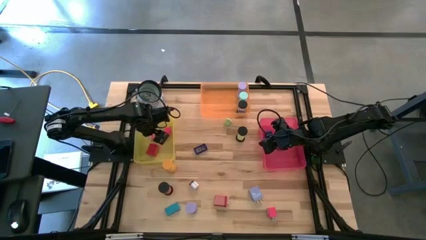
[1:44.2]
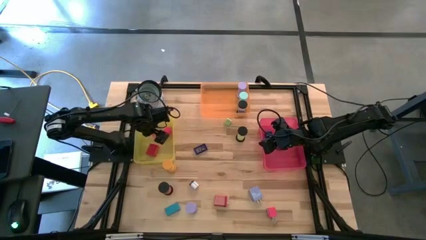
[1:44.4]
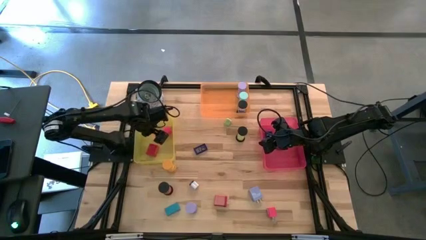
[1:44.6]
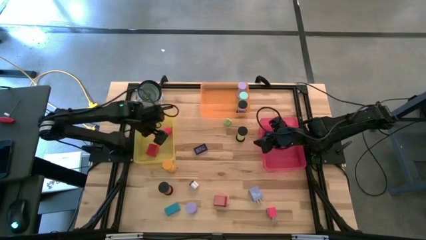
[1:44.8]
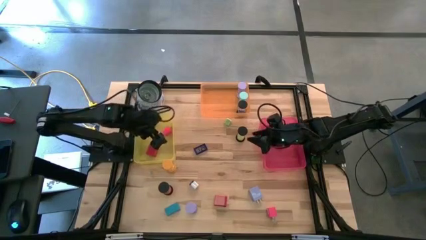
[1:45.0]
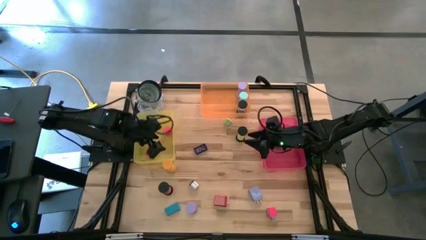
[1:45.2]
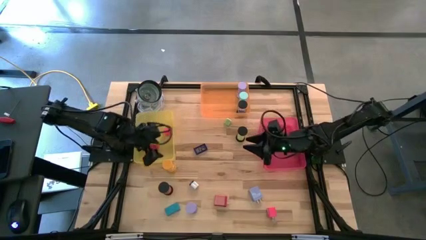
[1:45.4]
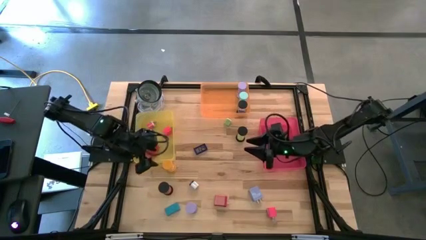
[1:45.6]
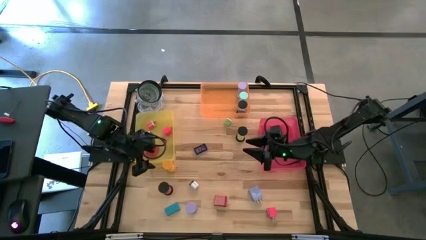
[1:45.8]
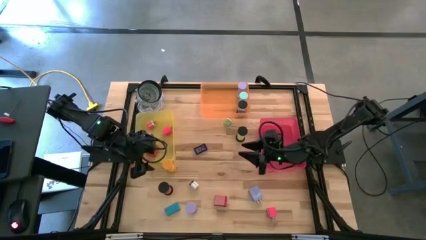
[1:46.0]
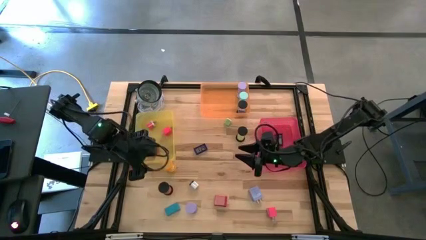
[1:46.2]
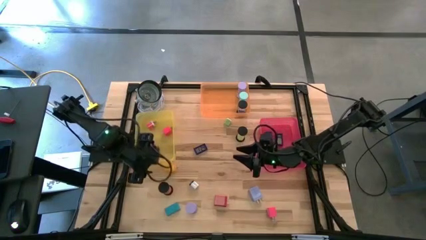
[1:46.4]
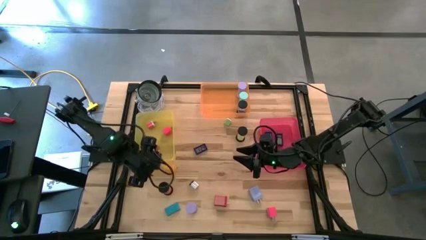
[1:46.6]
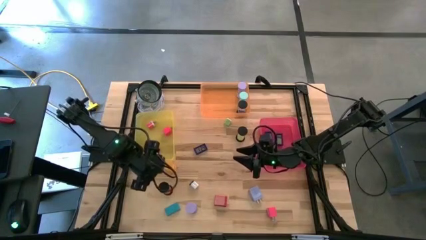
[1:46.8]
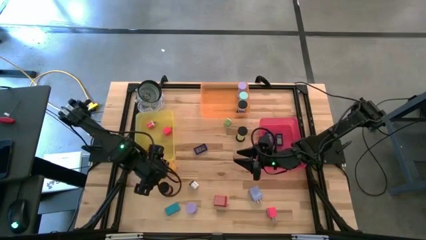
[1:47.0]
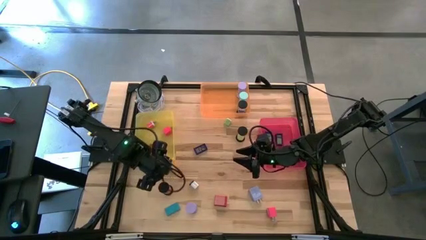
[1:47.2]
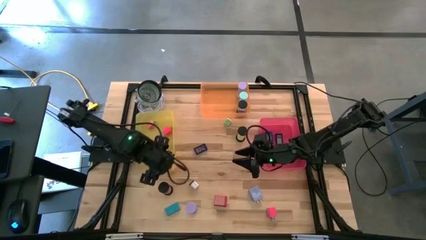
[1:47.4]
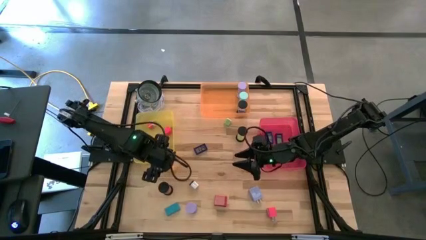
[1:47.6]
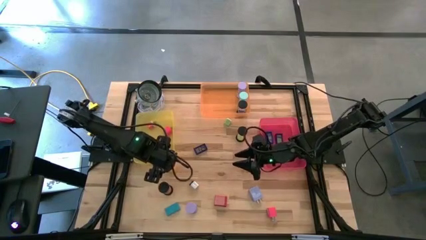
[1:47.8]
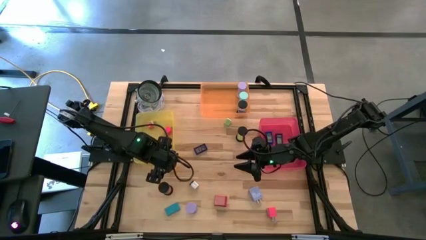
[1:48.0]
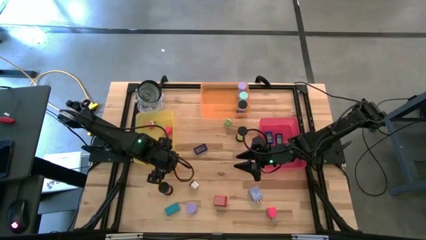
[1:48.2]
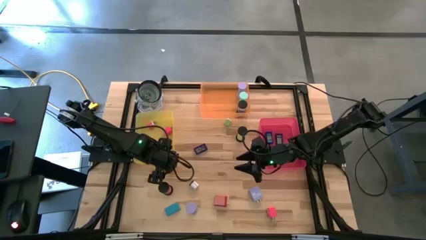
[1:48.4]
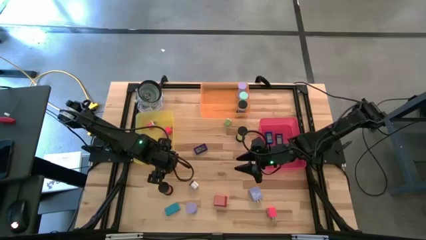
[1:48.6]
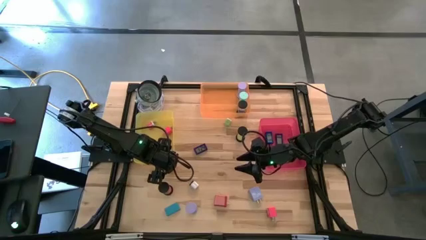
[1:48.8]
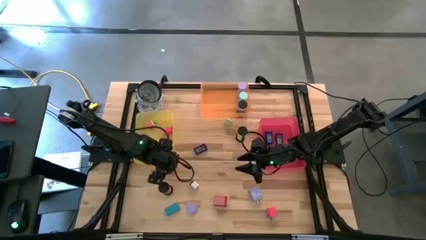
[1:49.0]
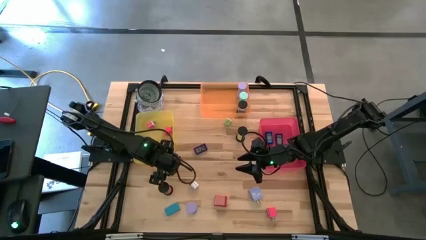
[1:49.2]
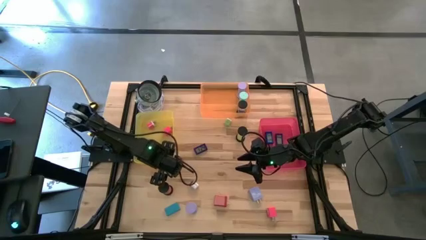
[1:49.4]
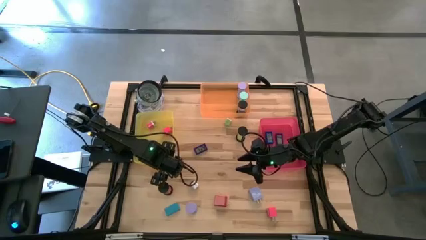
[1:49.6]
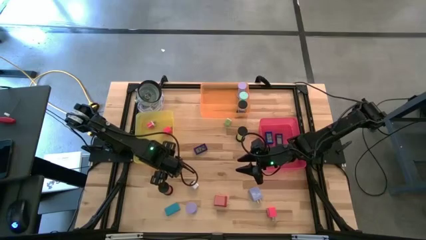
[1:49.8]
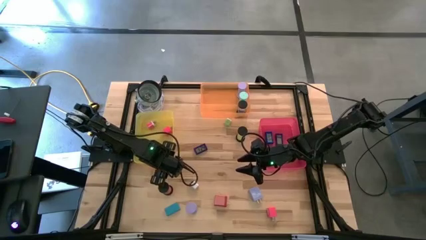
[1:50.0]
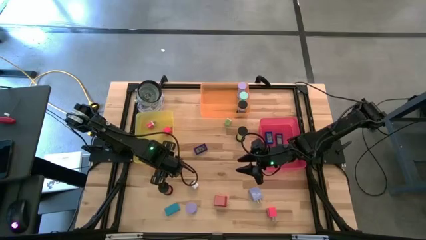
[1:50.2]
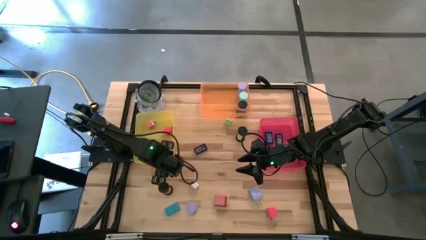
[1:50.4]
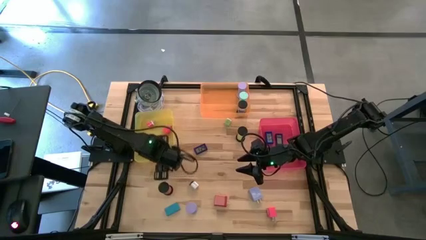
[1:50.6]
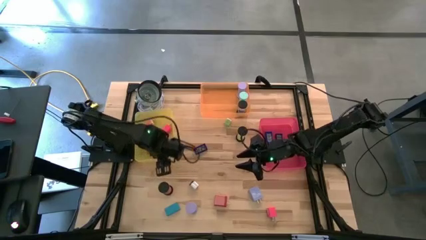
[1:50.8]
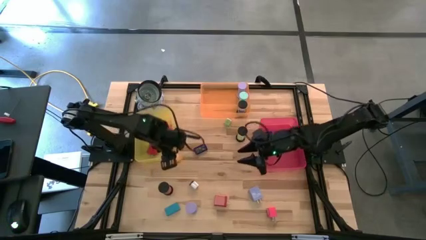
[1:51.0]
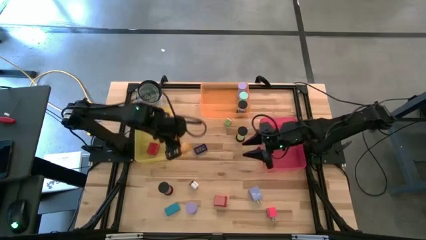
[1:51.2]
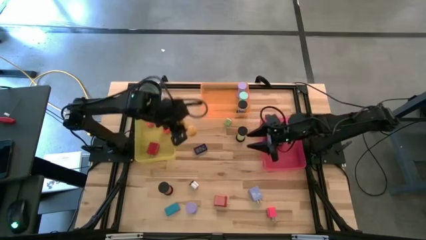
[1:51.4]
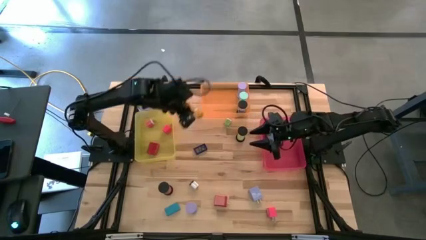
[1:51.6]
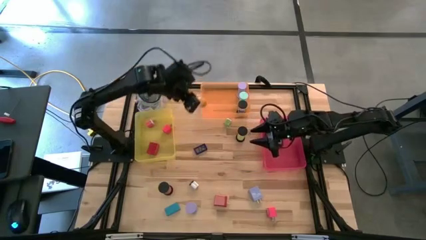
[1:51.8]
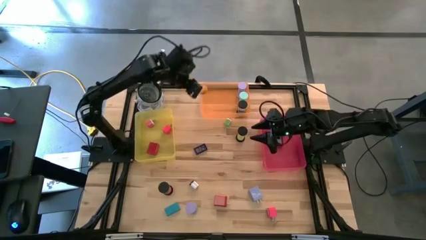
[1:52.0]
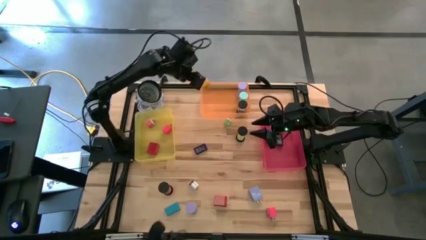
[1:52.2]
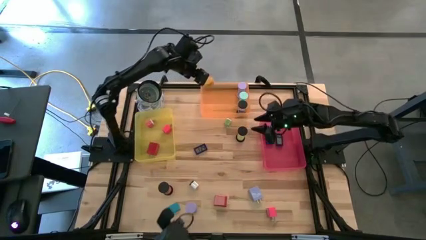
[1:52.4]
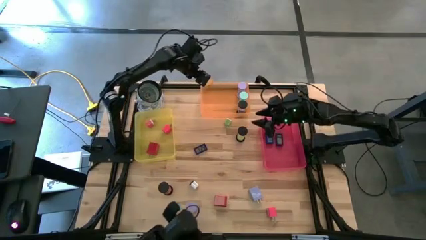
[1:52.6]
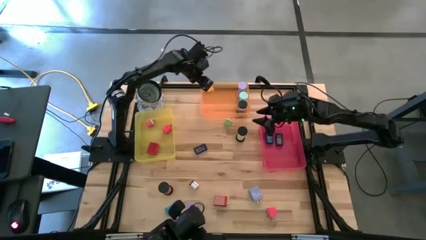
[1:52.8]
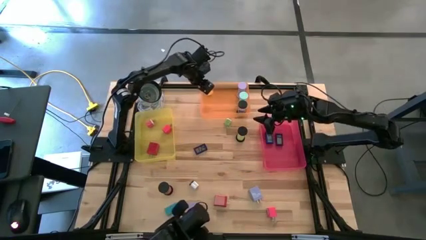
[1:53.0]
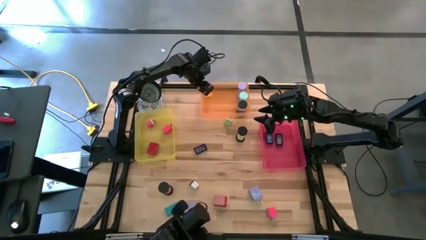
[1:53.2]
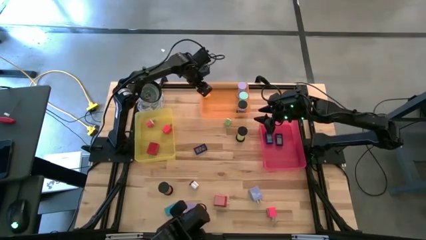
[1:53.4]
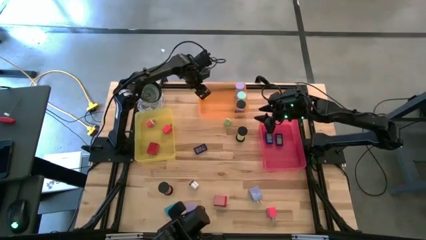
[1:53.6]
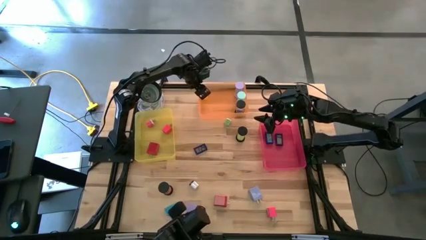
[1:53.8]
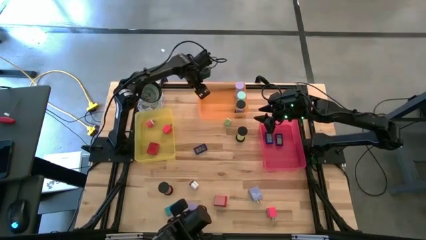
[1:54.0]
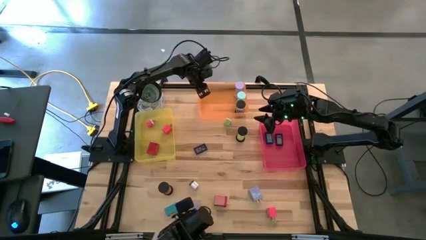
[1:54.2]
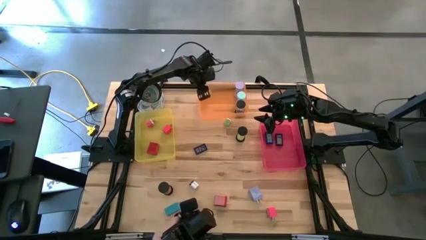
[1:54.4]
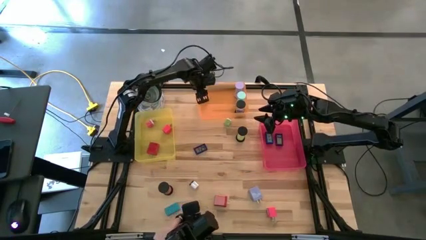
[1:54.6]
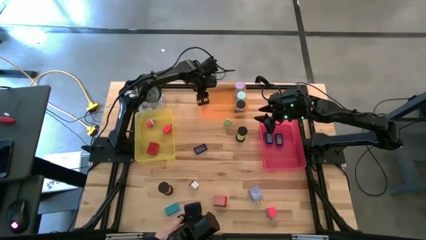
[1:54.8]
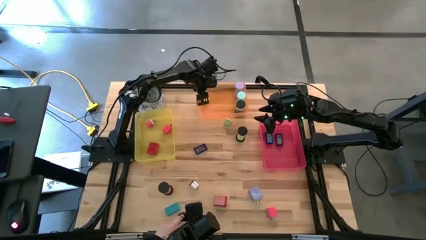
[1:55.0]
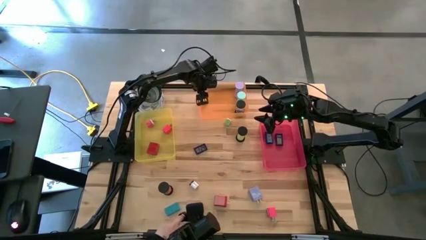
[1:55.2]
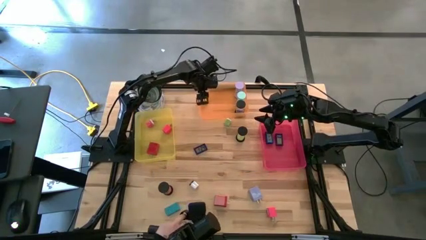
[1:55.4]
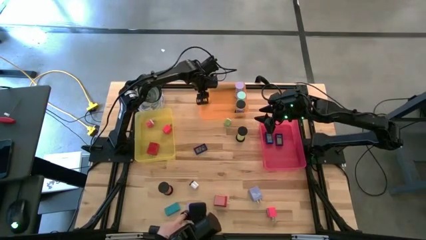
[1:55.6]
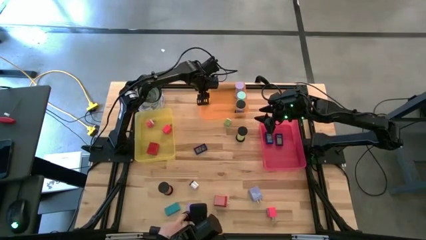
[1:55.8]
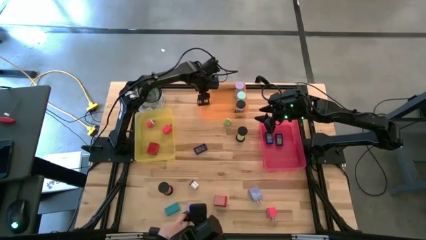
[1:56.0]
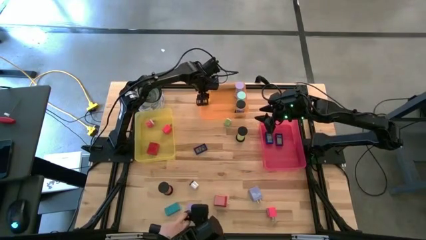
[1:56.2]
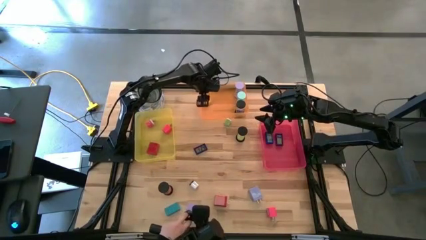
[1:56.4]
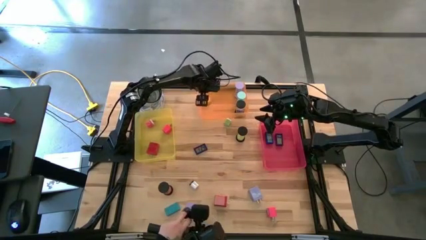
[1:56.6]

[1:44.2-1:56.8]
Task: Pick & Place Office items
Put the yellow hourglass in the orange bin

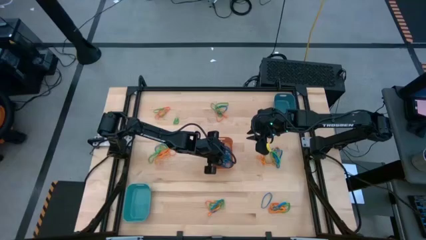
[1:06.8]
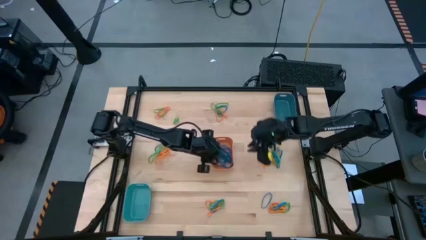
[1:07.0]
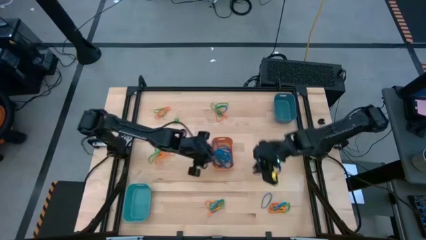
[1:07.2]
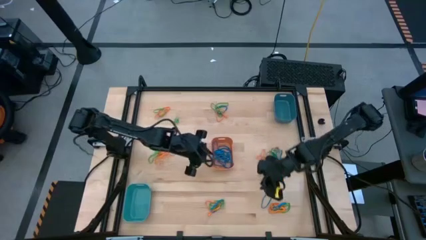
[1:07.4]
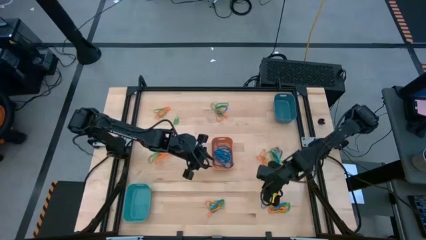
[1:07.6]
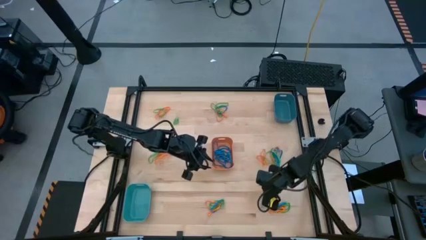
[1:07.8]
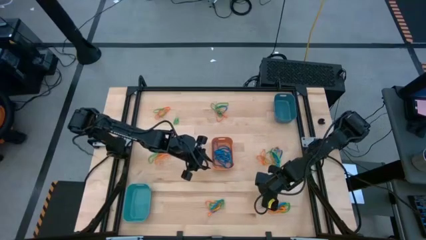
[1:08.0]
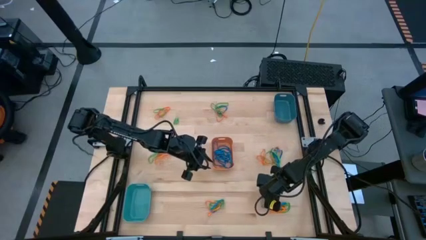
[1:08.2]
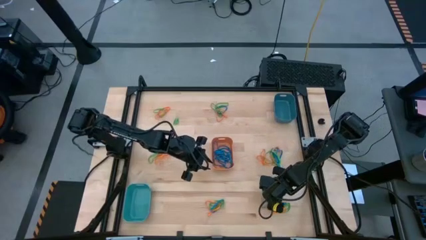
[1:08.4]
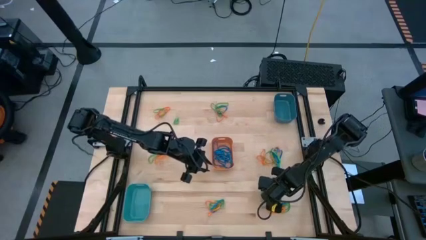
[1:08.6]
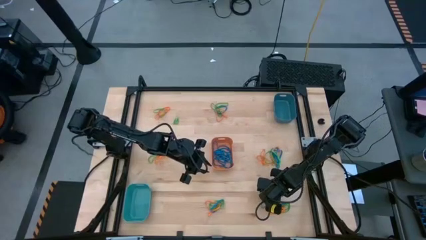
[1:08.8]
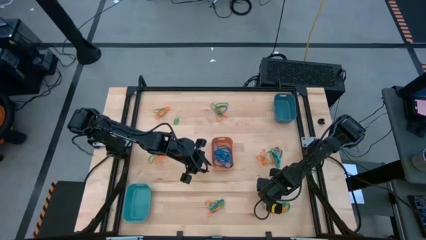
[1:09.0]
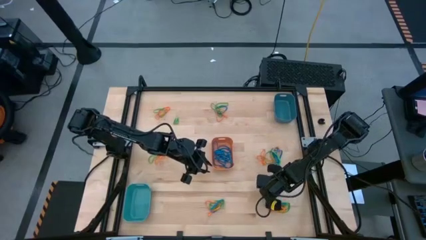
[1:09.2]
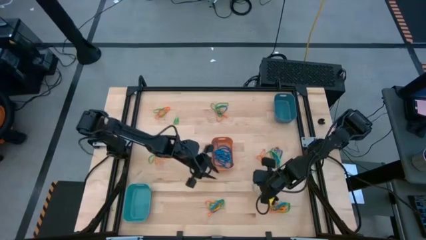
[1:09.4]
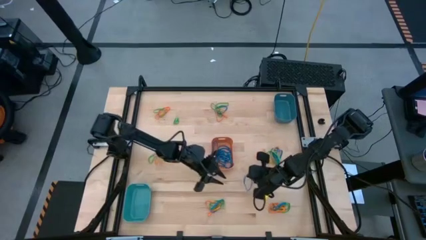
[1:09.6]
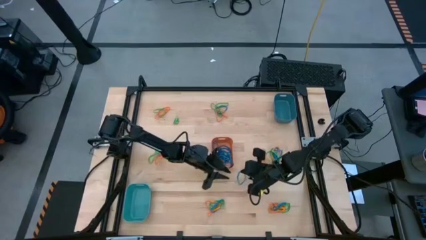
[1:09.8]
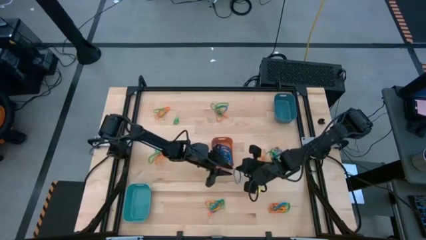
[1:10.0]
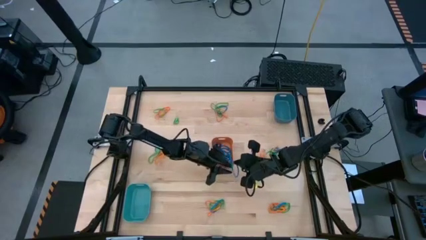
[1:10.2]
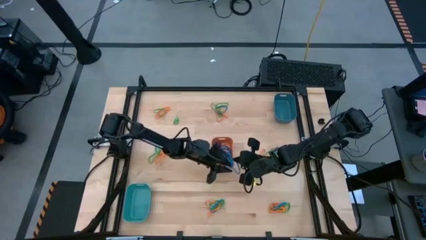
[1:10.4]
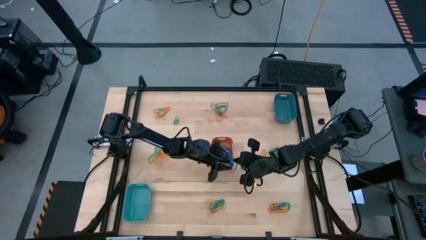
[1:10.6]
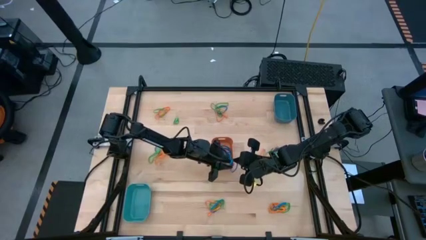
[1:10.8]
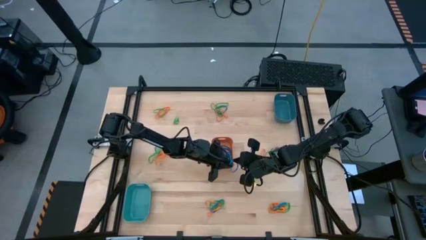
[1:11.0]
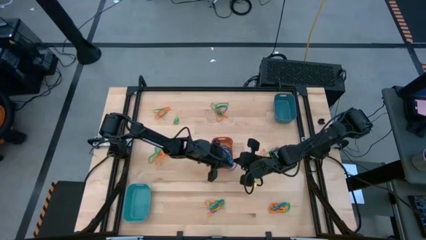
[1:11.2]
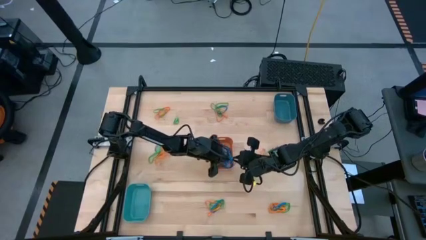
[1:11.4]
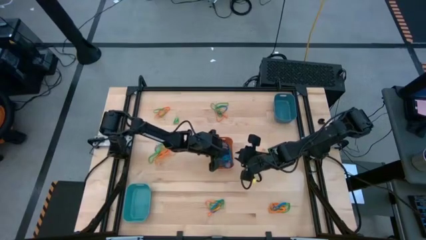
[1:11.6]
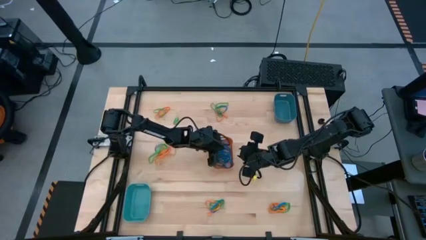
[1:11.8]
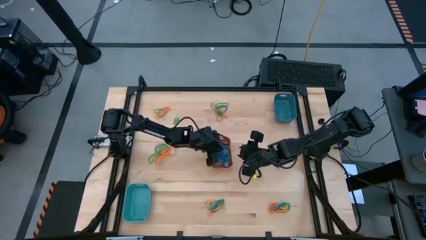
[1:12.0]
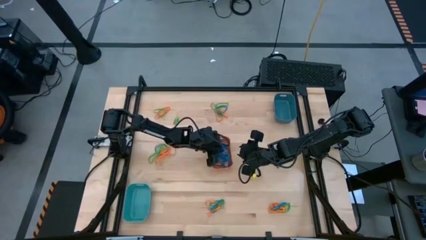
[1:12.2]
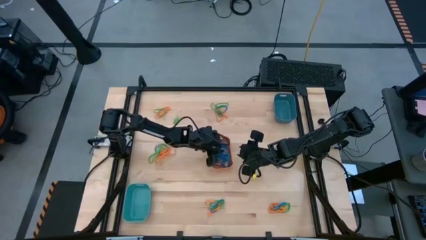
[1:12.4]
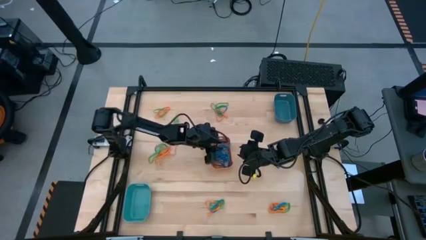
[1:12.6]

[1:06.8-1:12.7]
Task: Sort rubber bands into baskets
Put the blue rubber band into the orange bin
